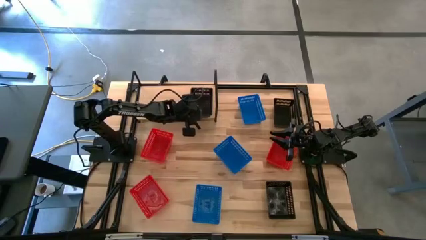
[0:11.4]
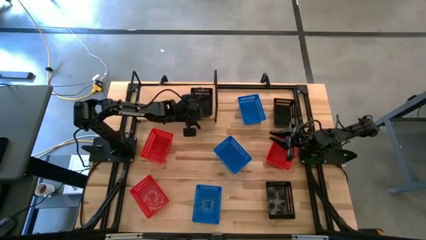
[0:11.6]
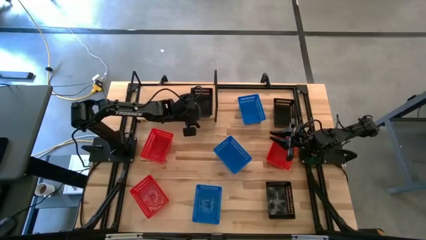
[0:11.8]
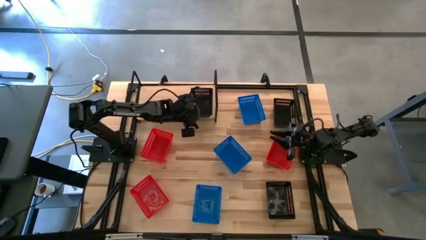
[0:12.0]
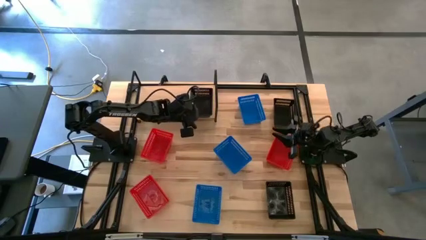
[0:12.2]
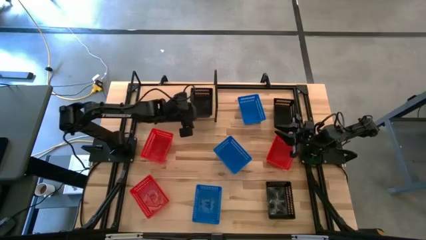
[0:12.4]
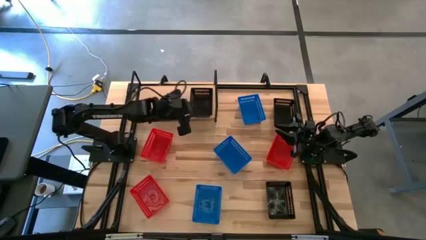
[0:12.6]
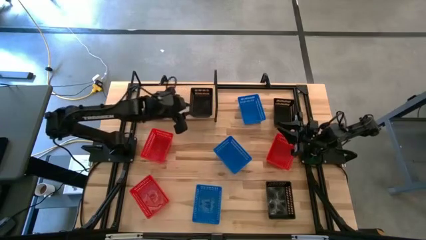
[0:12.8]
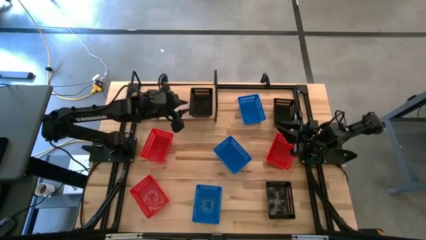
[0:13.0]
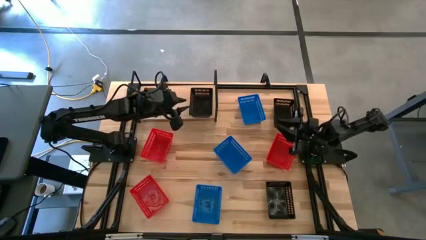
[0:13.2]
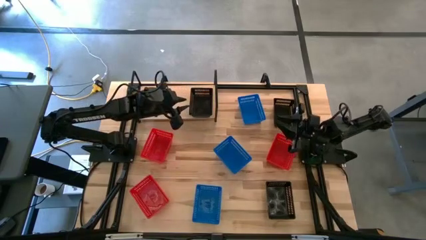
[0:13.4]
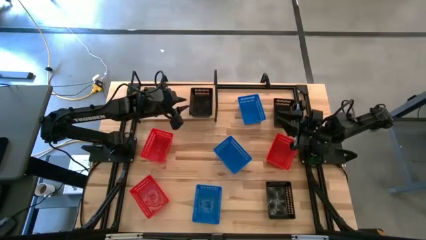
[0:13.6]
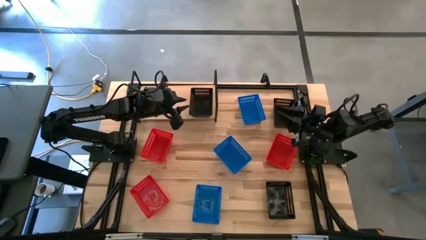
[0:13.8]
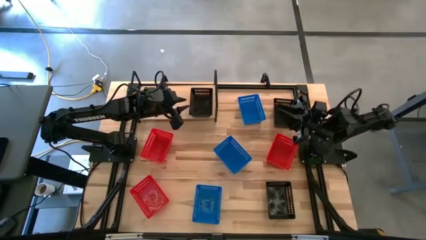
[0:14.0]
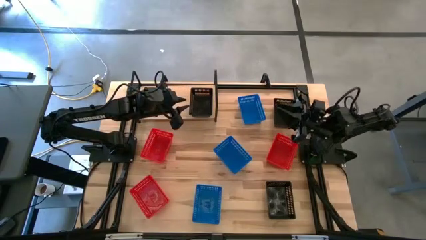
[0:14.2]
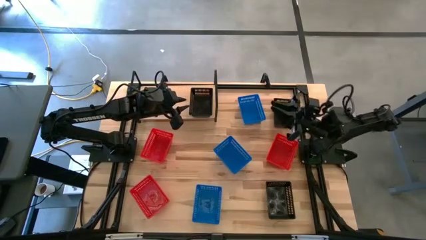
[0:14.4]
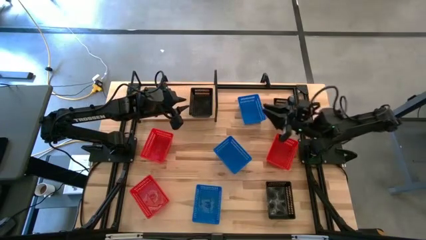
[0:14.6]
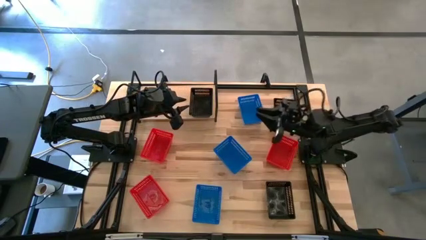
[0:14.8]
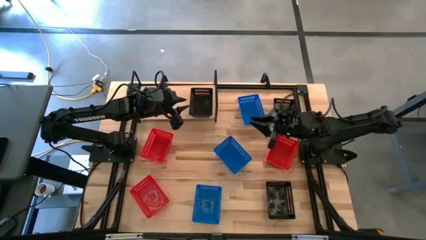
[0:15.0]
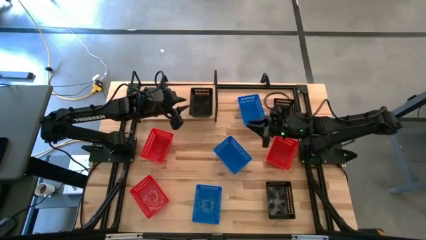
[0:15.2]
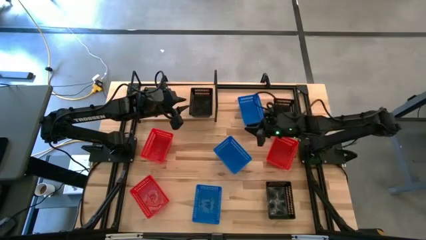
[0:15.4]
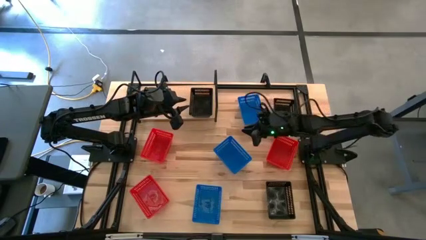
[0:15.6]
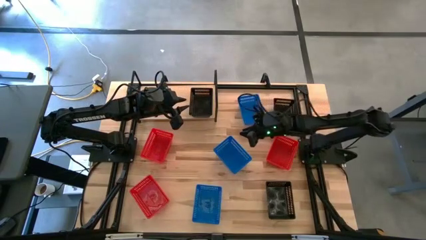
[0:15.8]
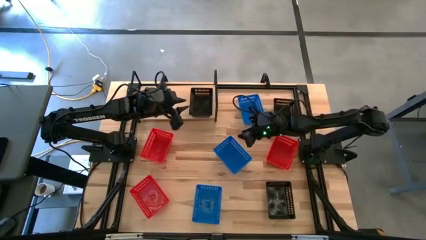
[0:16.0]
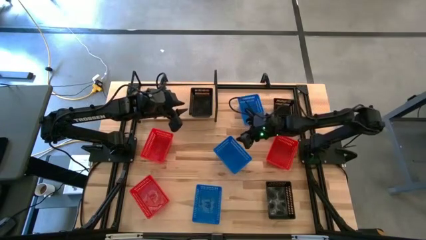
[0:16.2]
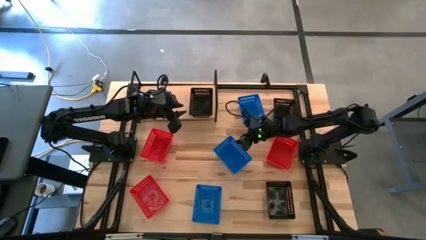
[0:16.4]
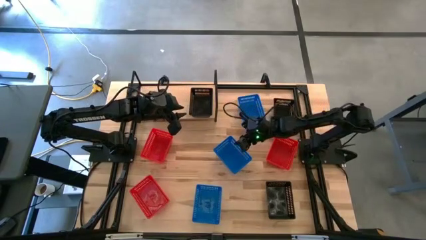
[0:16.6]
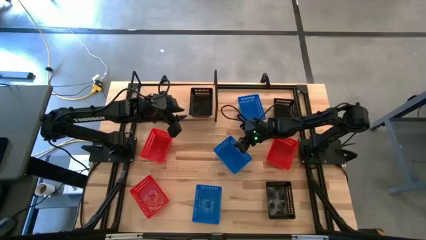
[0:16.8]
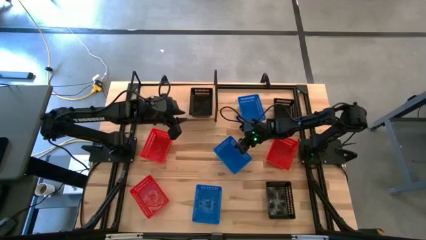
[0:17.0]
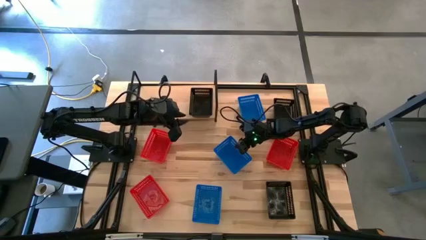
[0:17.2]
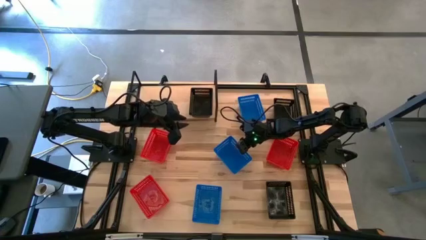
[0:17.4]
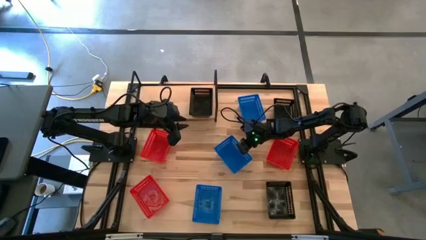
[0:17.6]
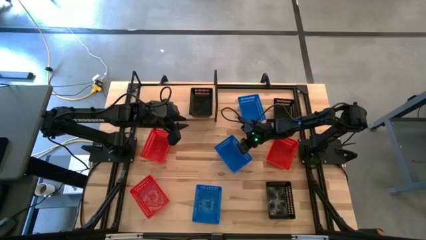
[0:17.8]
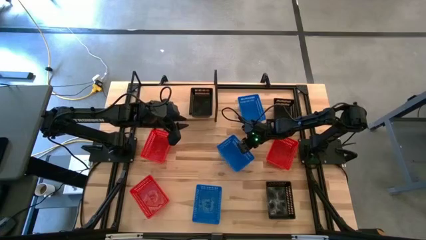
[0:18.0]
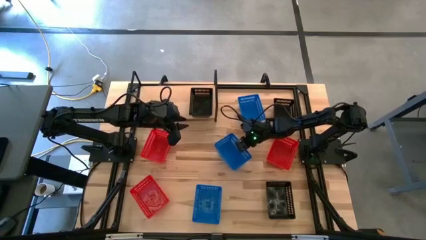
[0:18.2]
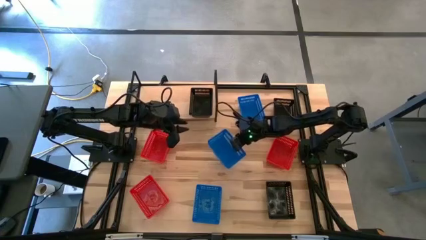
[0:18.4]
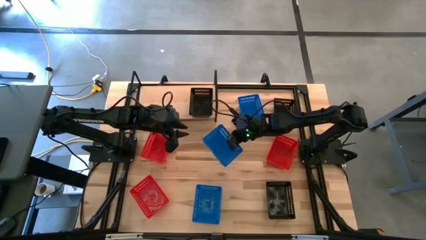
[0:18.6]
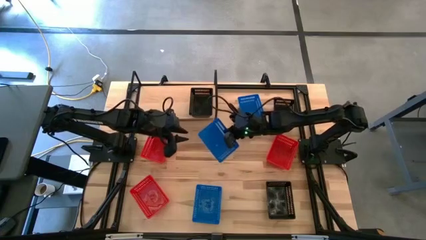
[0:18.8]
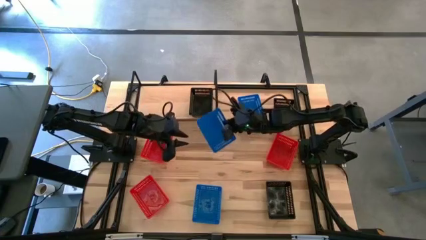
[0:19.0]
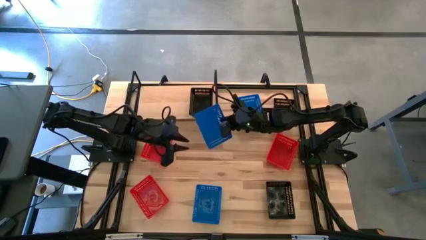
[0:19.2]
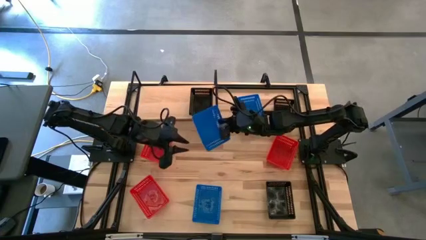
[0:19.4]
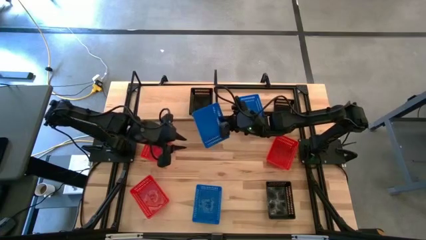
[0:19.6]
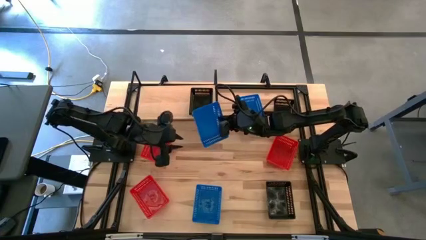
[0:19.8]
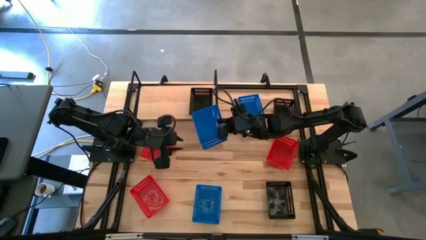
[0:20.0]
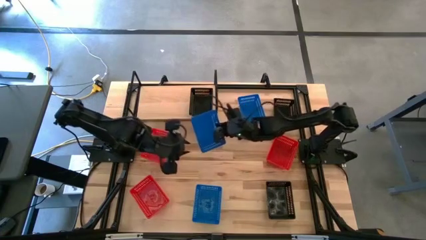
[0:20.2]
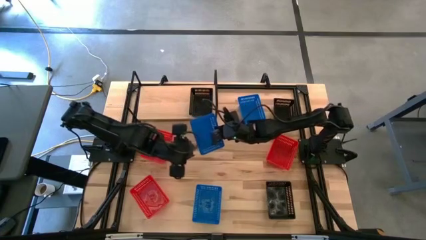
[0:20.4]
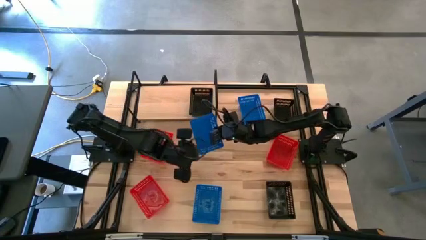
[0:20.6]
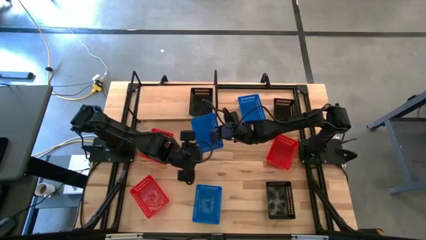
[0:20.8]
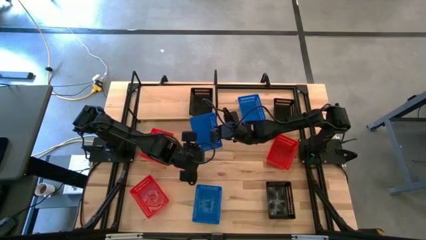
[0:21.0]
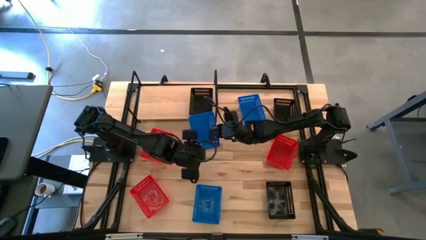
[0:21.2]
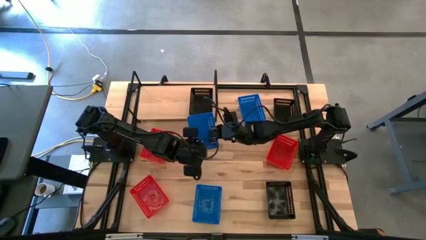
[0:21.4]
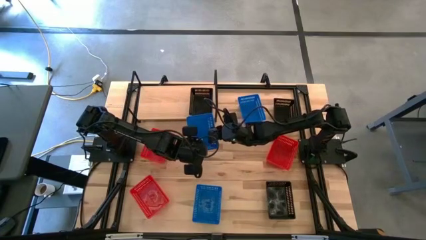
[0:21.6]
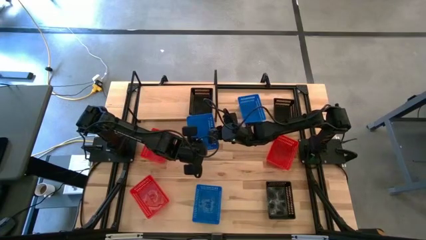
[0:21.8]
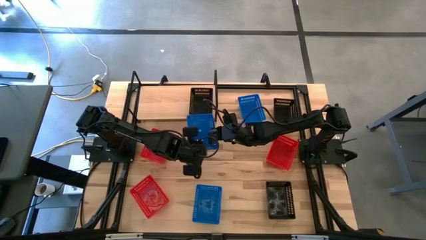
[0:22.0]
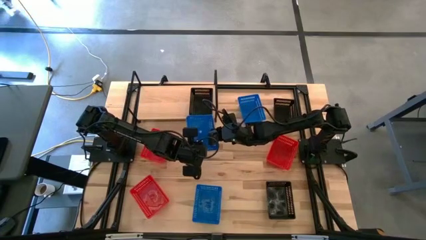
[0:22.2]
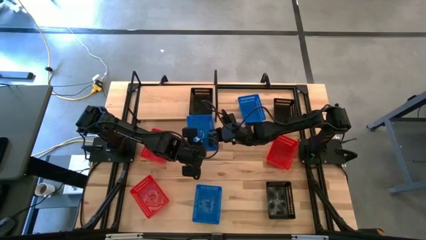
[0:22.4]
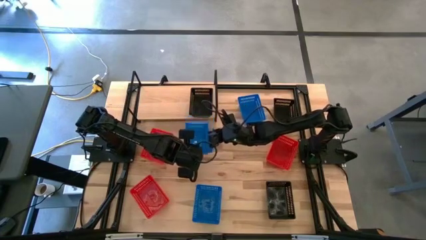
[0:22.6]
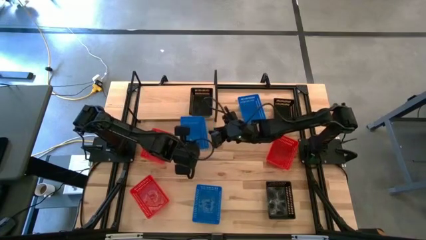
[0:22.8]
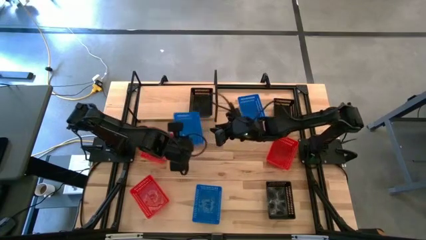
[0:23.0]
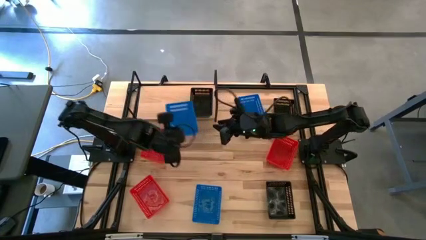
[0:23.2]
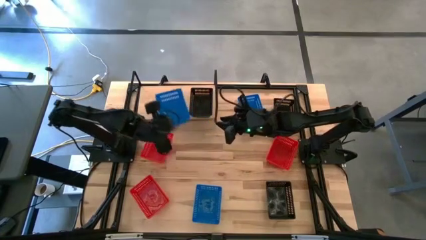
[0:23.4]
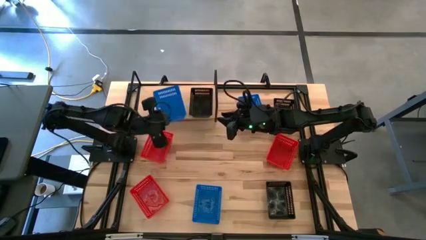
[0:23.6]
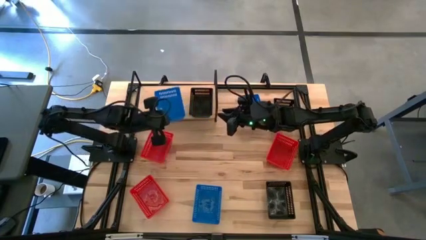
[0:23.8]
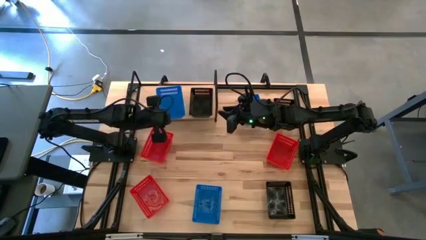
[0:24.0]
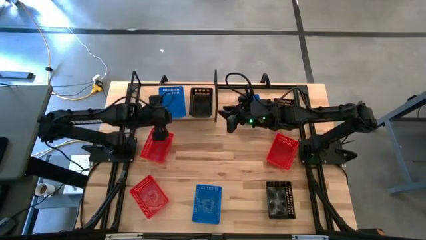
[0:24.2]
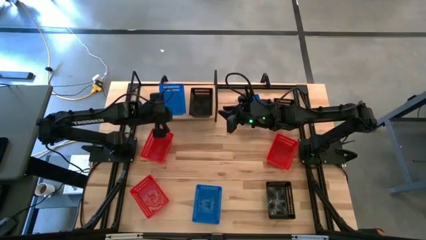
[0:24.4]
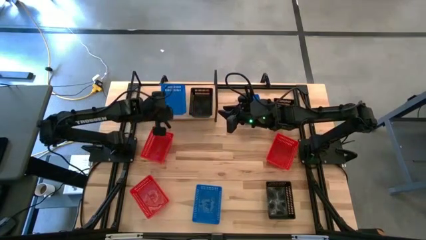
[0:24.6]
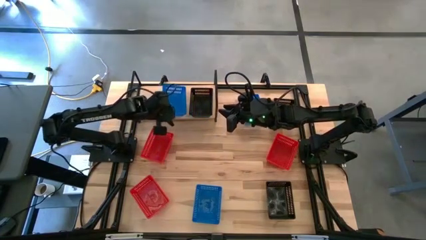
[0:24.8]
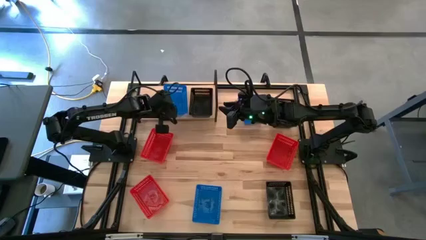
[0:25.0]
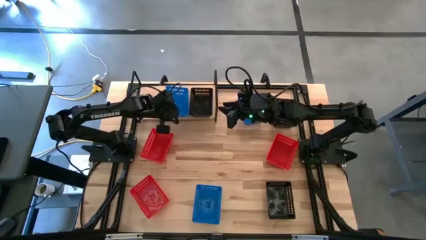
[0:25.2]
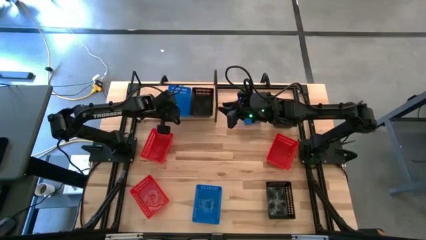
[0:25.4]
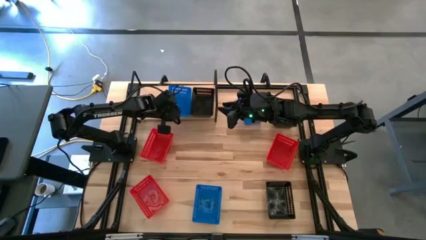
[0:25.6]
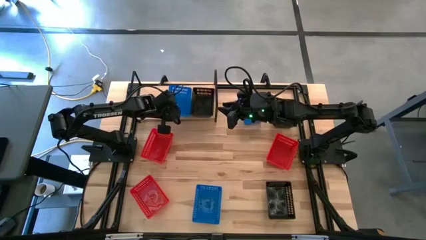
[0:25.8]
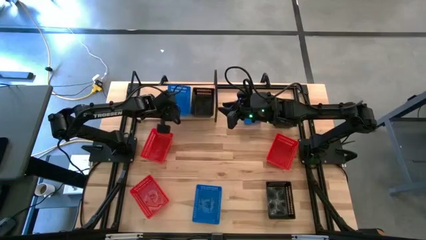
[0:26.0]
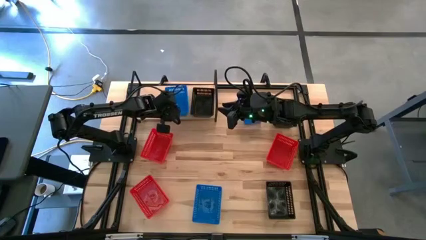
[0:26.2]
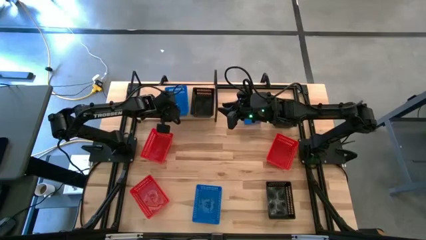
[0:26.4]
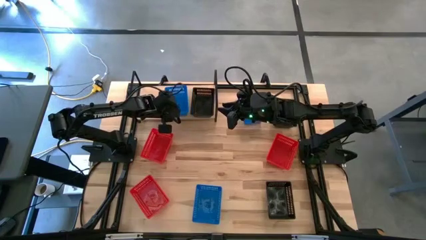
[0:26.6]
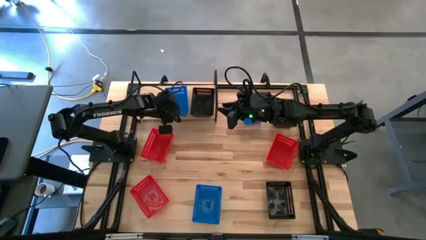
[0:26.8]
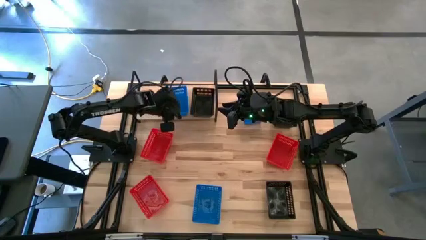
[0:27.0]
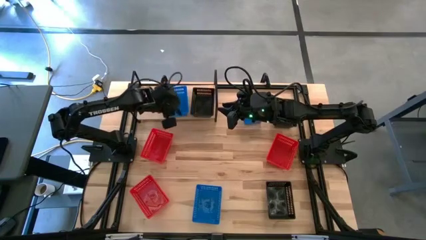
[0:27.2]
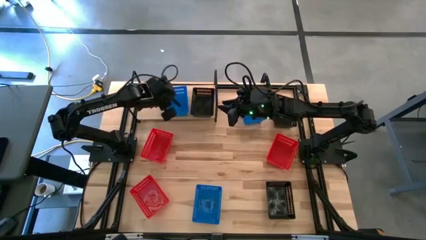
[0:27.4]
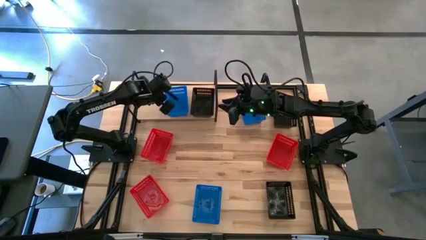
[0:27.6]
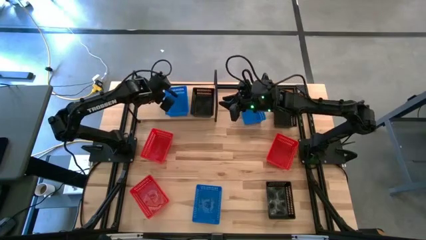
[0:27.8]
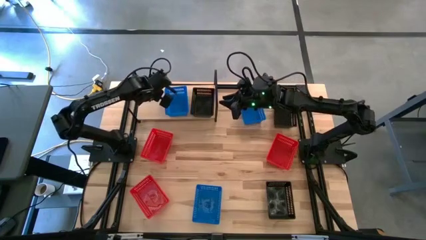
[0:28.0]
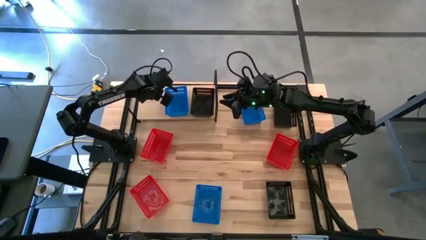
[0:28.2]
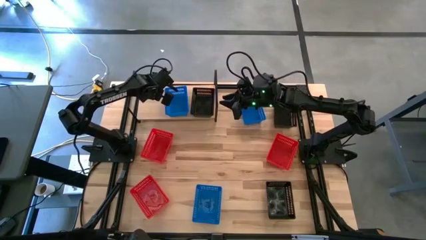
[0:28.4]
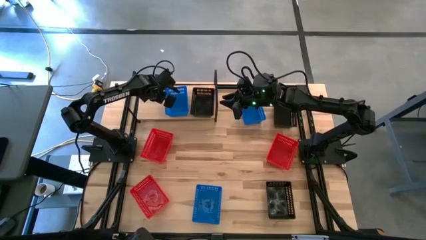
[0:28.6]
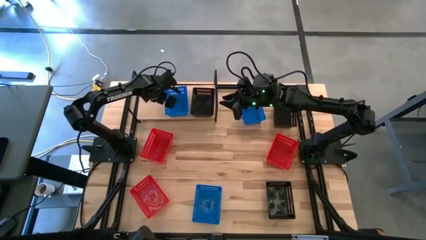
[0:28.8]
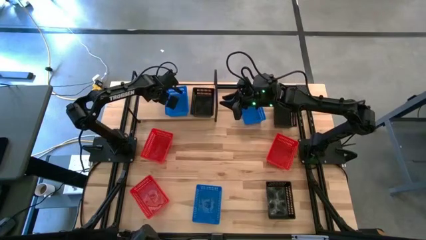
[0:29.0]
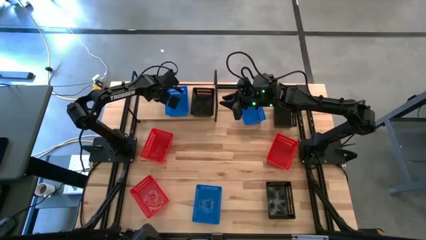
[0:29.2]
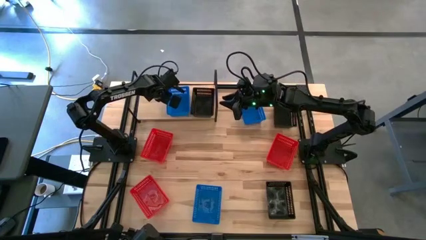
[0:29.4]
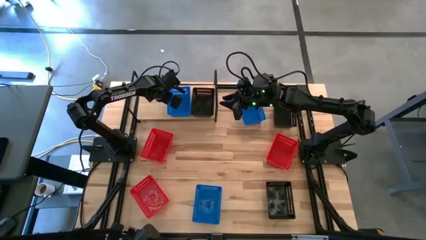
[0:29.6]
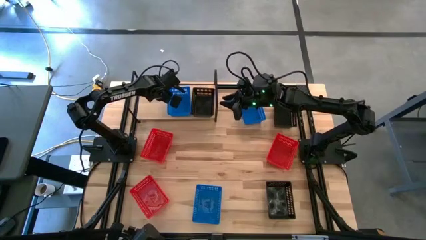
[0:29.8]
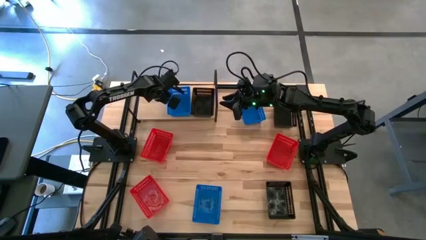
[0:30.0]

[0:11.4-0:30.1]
Task: Stack baskets on shelf by color
Put the center blue bin on the shelf
